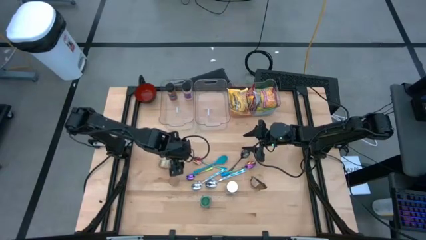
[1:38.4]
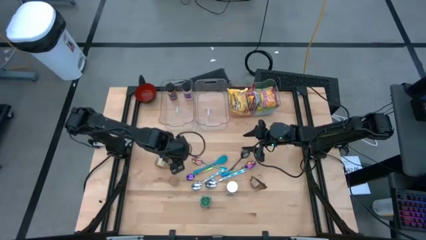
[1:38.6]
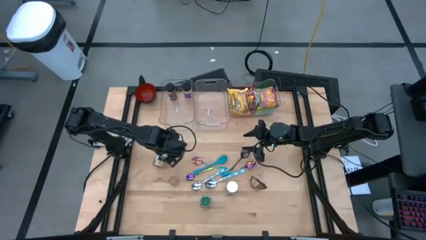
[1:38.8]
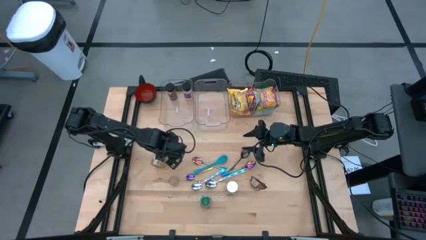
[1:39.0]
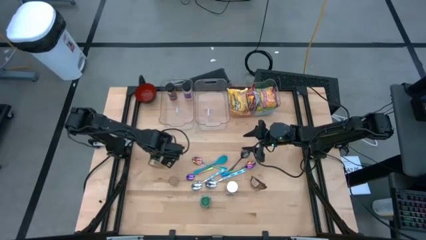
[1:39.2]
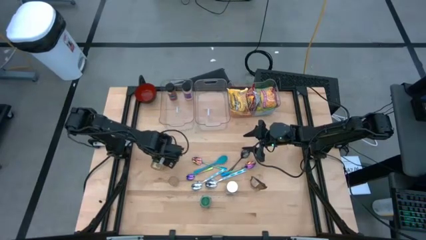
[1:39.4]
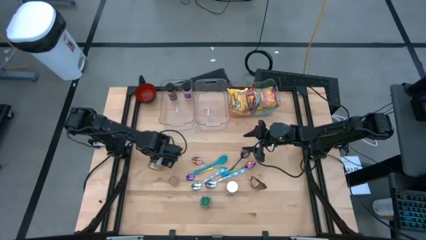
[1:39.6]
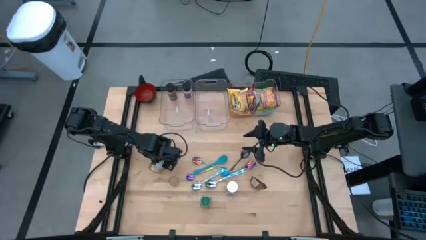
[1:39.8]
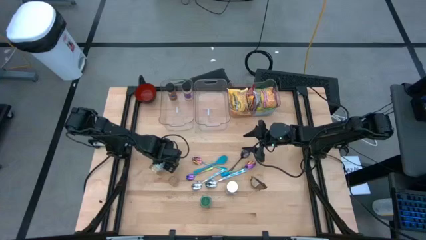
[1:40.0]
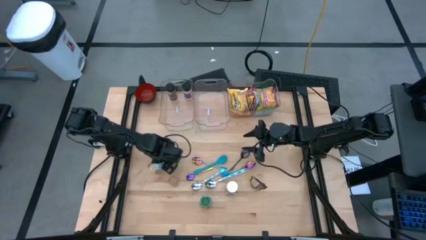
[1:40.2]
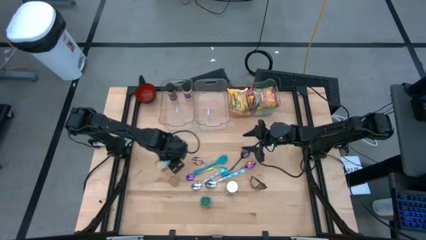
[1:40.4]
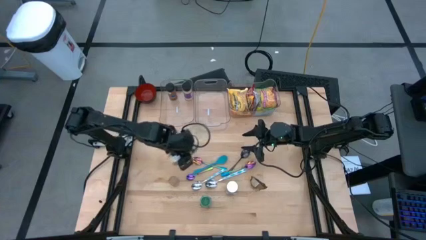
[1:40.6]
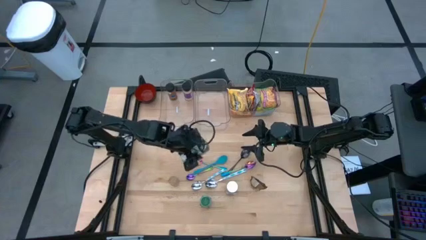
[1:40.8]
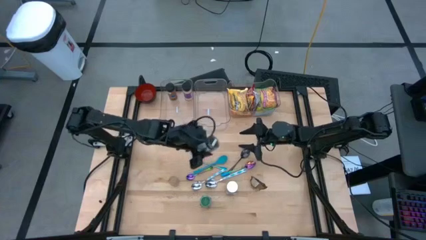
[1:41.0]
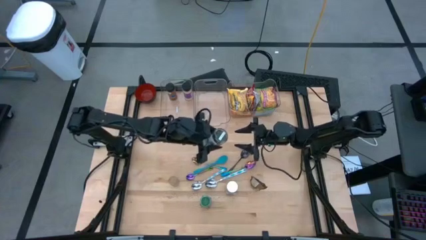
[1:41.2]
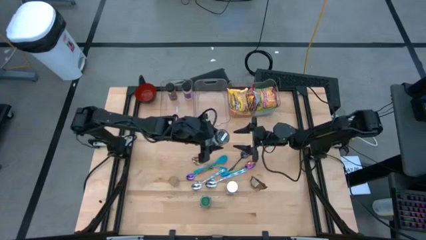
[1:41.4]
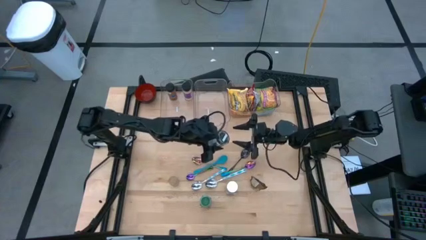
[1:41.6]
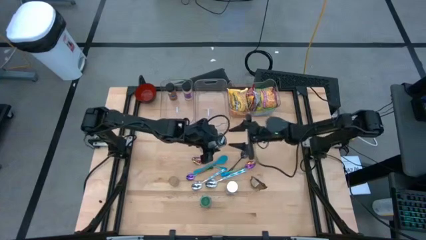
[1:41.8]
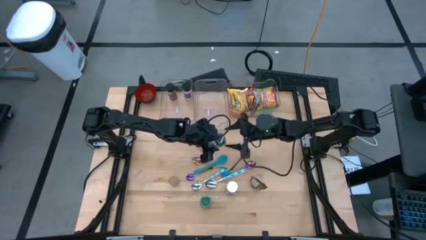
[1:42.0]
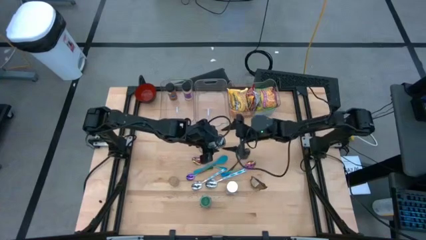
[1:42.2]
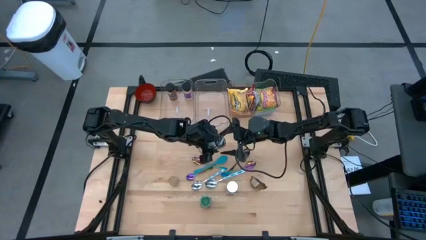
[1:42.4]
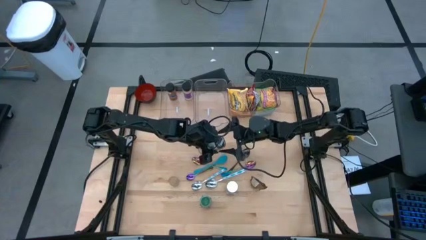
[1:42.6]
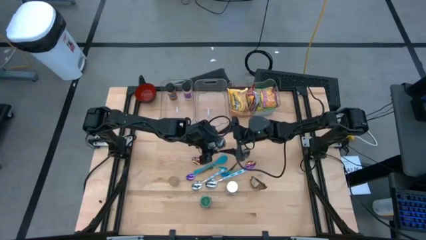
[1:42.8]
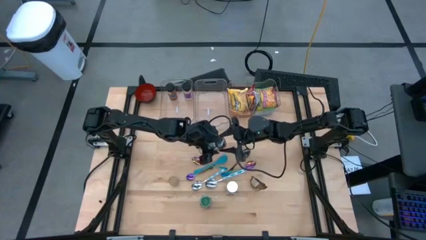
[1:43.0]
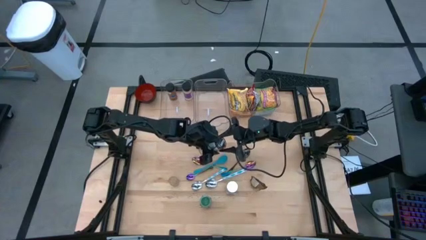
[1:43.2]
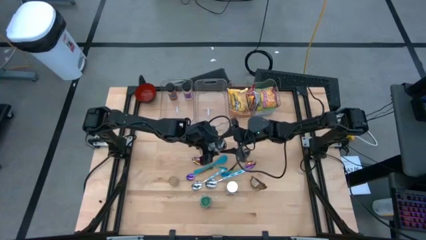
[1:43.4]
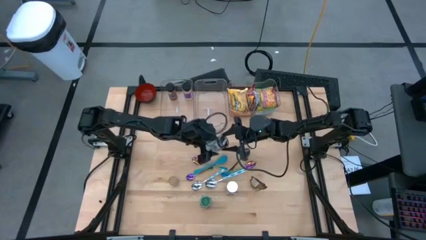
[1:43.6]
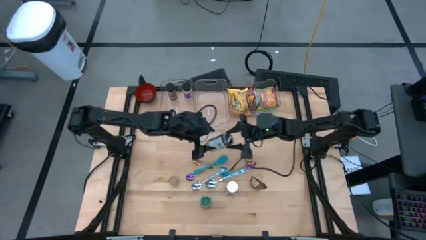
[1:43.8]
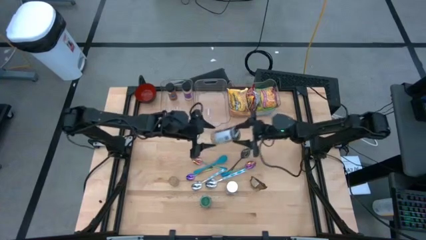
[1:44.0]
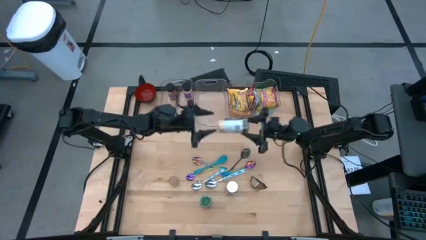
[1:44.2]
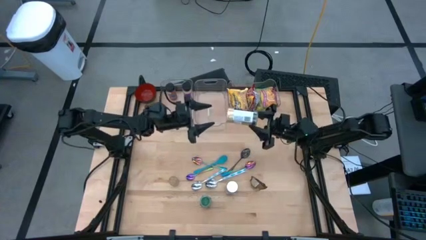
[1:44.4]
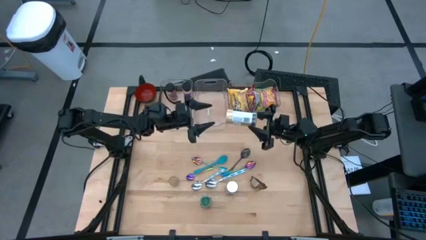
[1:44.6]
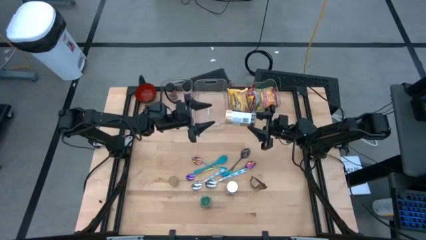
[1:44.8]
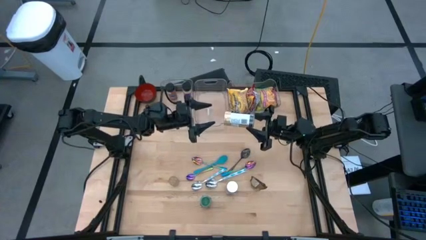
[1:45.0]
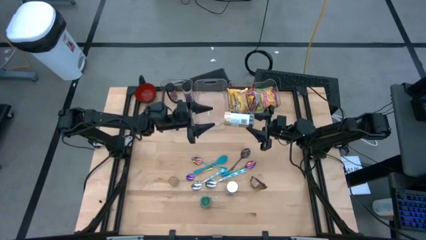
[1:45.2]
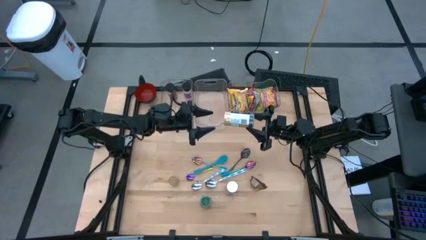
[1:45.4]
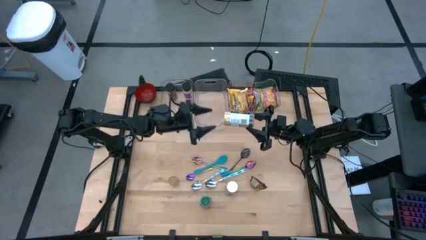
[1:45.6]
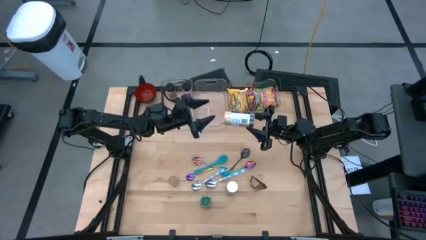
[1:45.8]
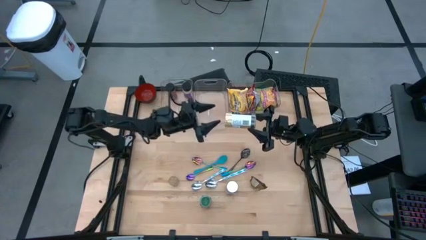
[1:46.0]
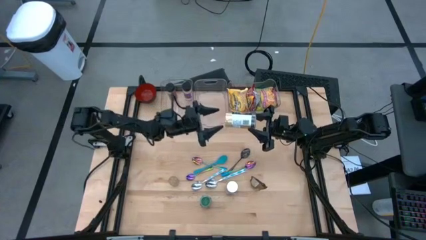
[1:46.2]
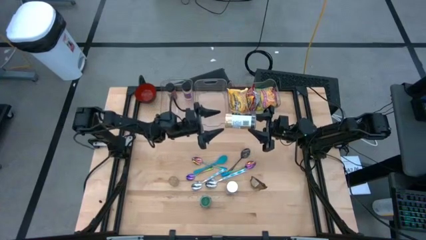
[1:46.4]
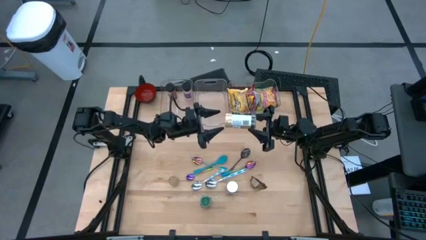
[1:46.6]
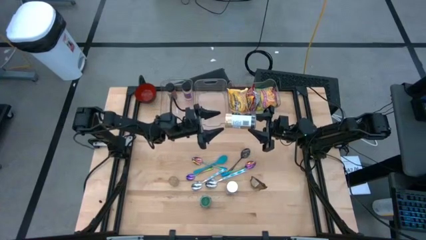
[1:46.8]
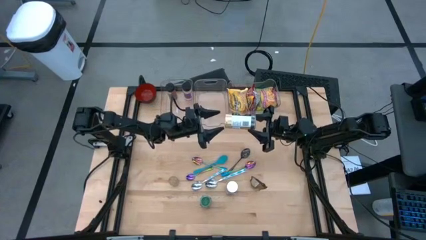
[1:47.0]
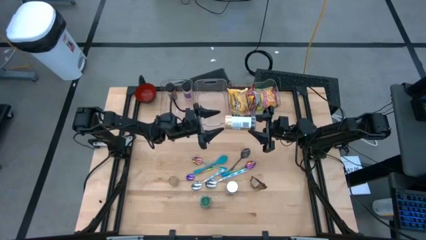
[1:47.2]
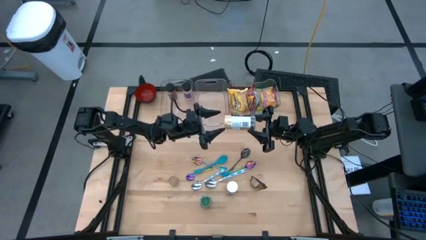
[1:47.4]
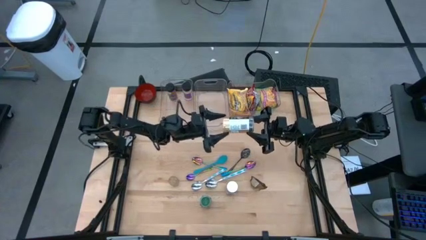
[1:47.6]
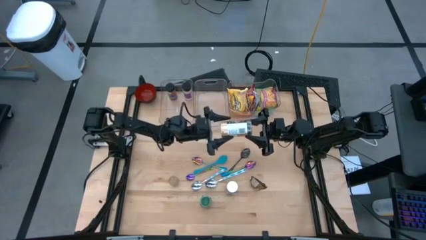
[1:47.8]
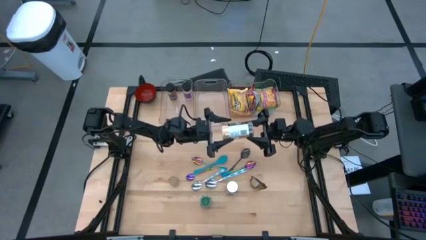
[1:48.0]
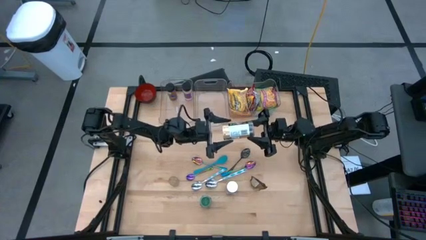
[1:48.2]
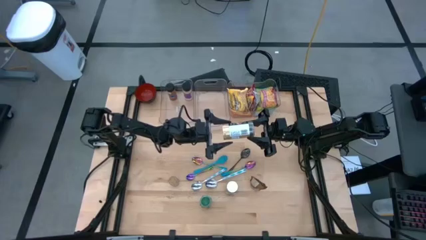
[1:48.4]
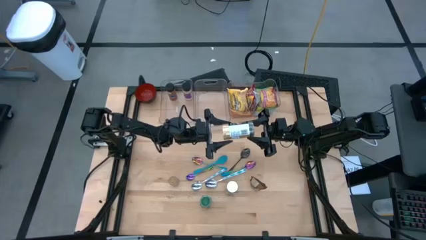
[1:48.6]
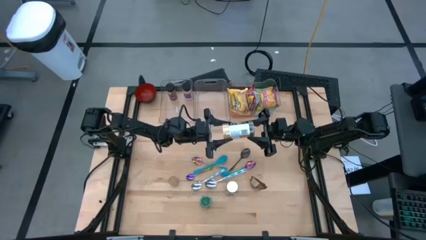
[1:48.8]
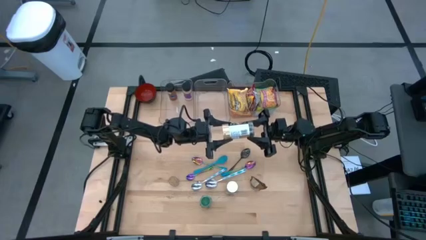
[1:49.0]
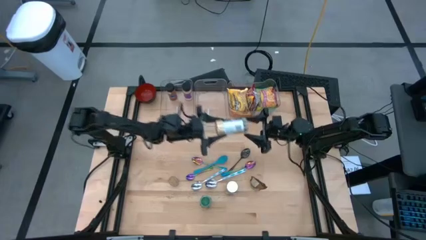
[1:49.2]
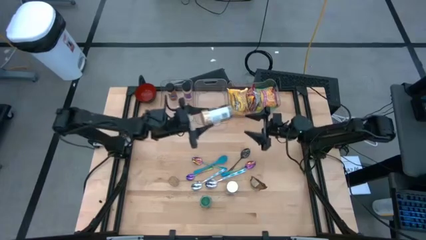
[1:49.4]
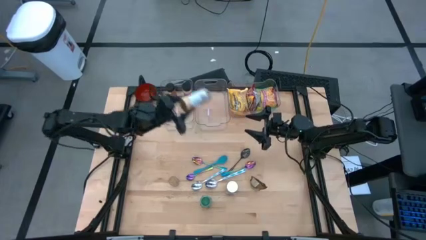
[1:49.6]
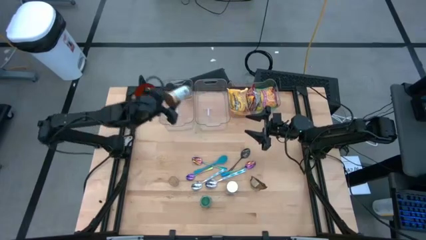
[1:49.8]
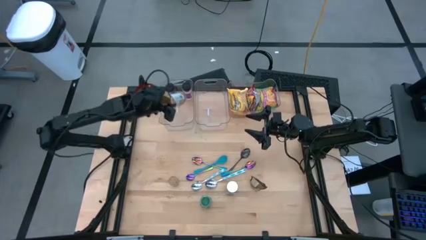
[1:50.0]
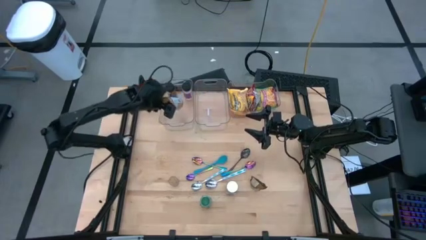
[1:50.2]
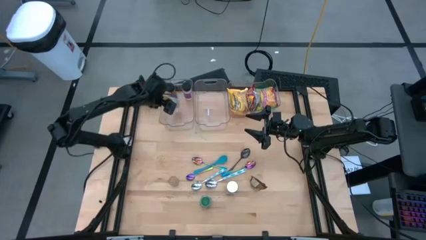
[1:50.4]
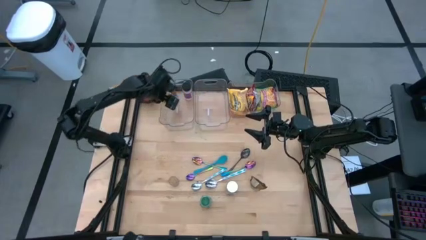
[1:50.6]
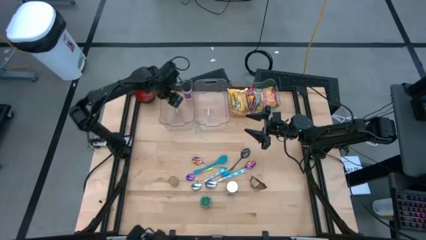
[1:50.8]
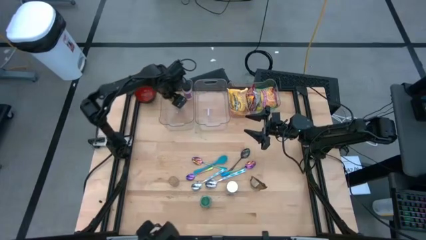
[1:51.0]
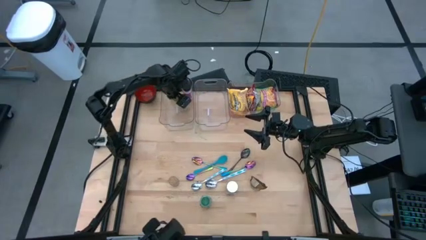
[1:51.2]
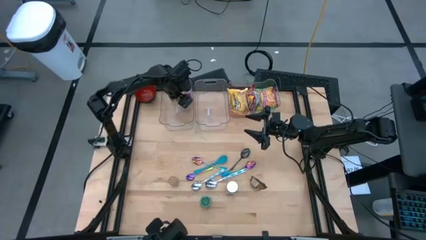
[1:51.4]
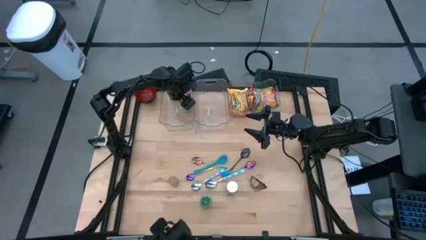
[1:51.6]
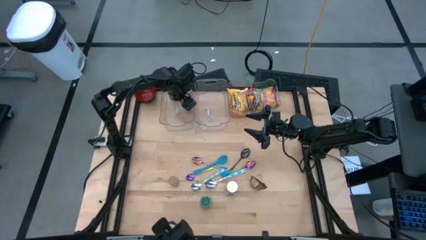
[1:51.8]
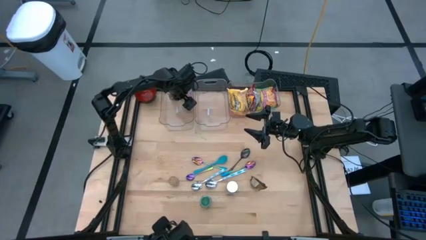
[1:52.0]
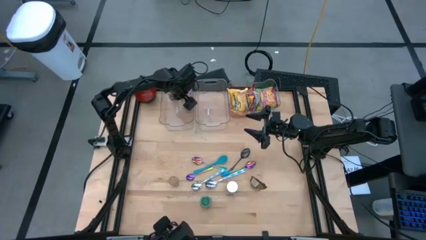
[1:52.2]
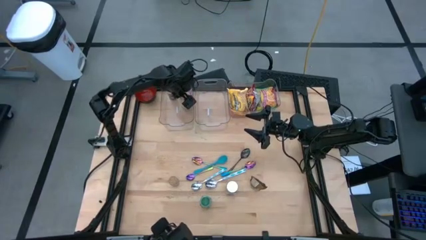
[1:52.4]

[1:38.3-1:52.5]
Task: Pick & Place Food Item
Put the gold seasoning bottle into the left transparent bin

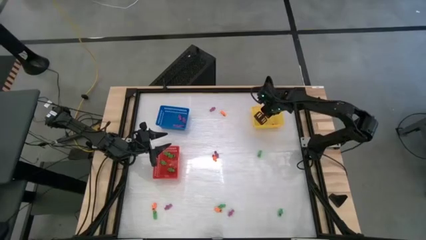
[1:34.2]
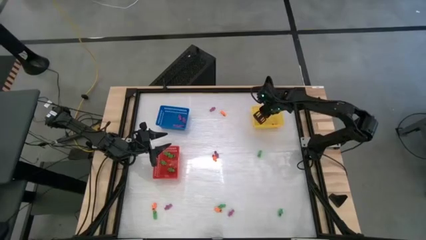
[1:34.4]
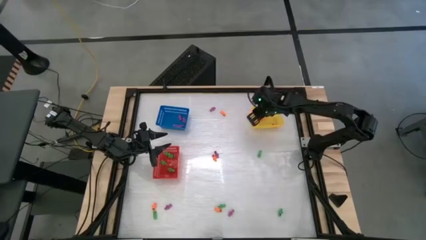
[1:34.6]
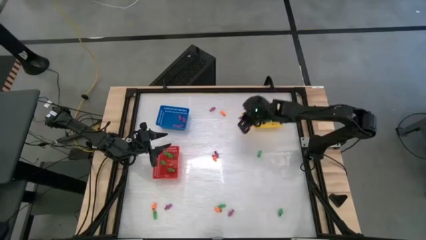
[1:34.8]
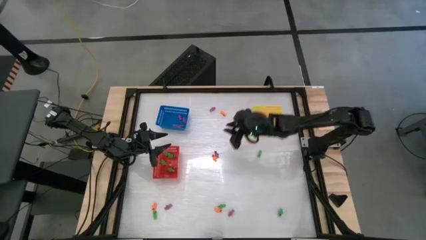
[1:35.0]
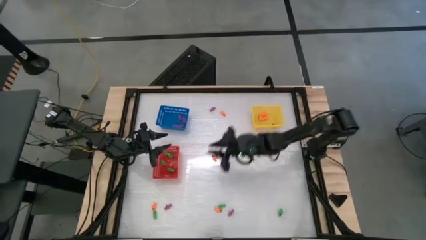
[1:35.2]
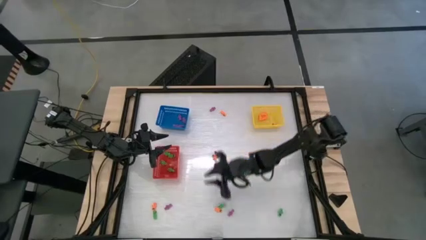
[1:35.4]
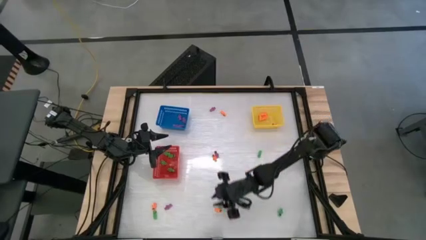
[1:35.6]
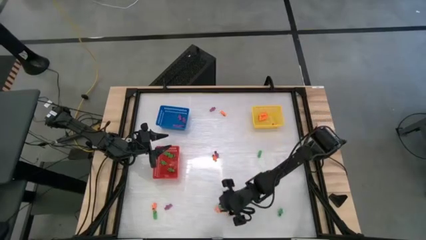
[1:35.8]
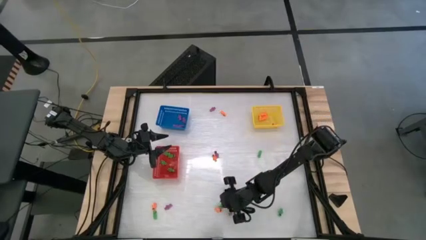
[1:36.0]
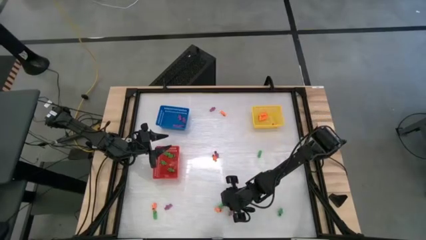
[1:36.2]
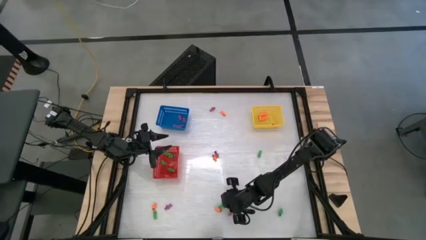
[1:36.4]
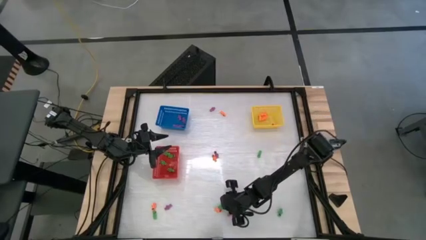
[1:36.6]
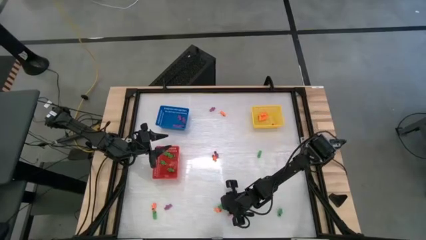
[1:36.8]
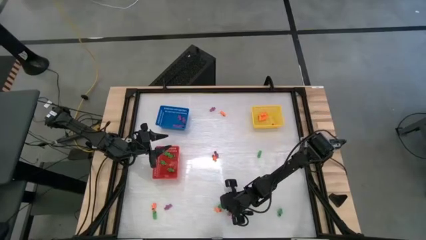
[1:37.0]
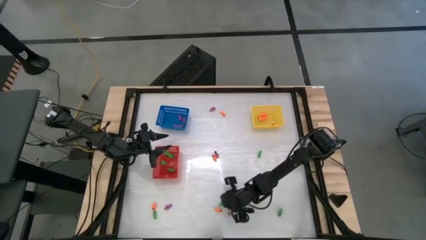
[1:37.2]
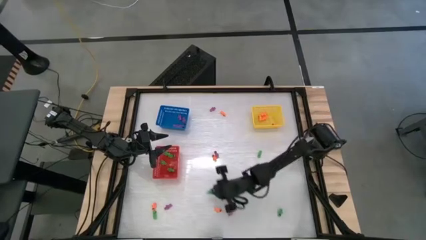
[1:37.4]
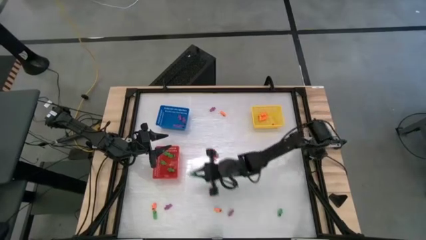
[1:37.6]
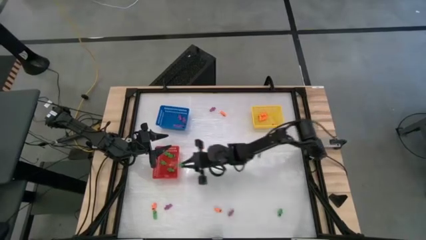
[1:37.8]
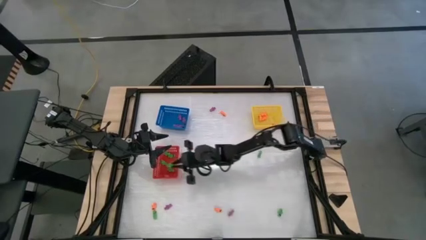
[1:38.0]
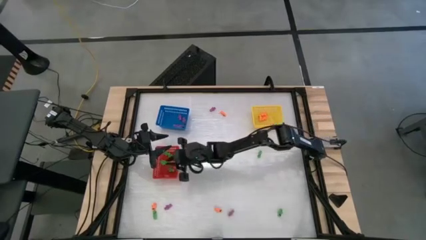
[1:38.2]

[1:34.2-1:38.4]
Task: Sort Halloween decoration
Put the green skeleton toy into the red bin
